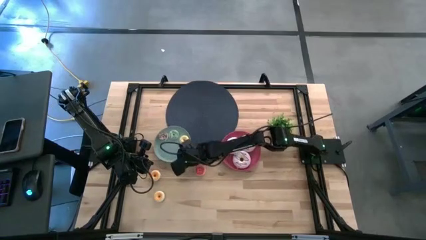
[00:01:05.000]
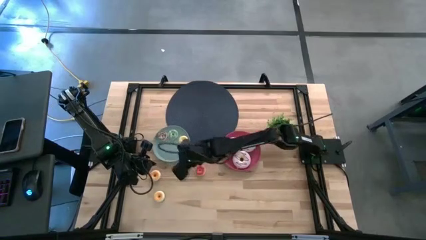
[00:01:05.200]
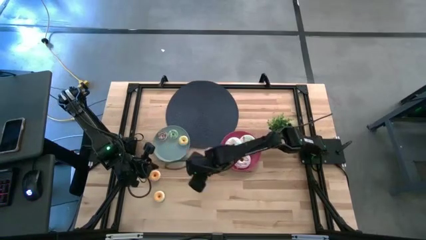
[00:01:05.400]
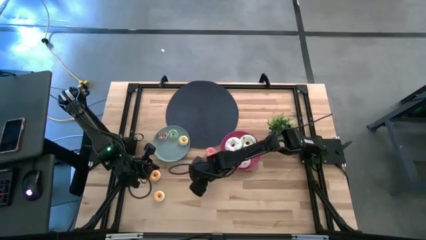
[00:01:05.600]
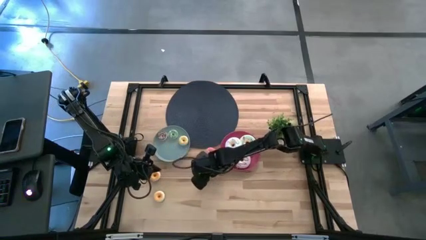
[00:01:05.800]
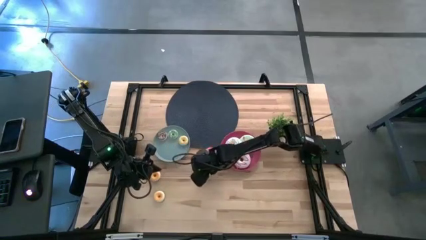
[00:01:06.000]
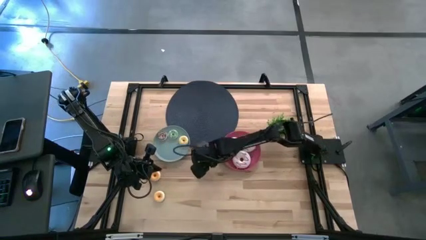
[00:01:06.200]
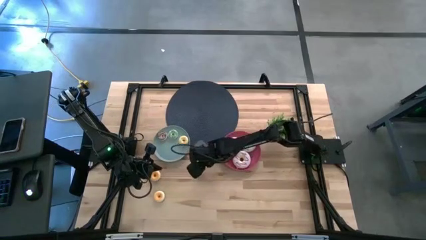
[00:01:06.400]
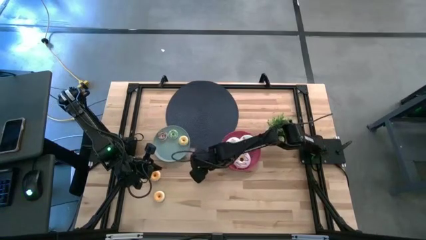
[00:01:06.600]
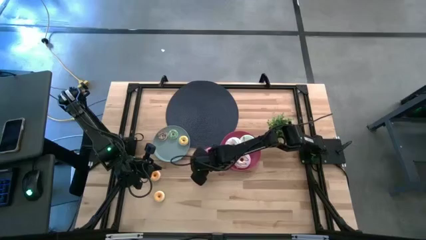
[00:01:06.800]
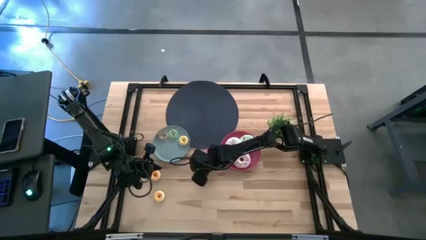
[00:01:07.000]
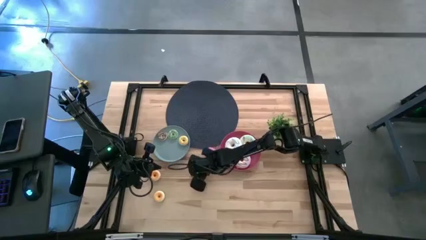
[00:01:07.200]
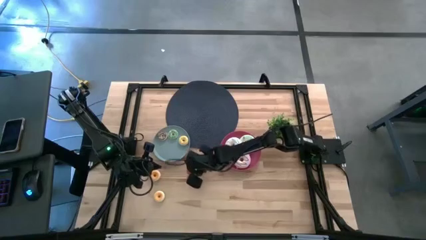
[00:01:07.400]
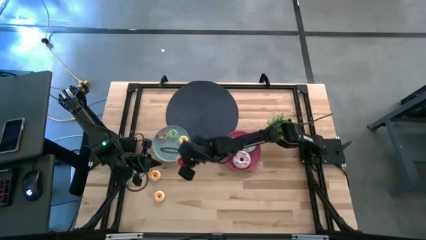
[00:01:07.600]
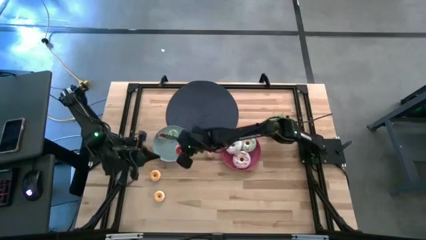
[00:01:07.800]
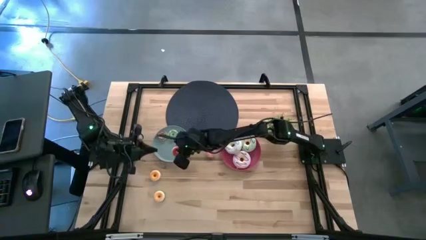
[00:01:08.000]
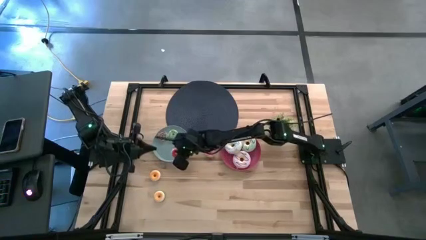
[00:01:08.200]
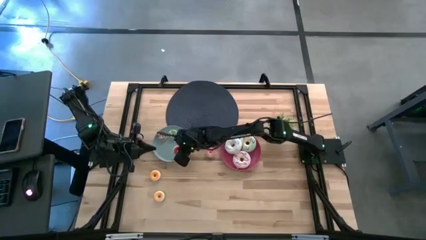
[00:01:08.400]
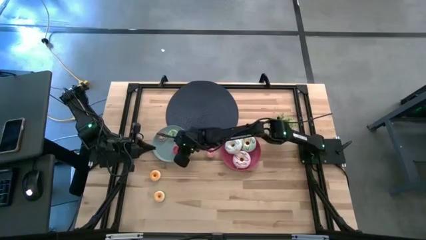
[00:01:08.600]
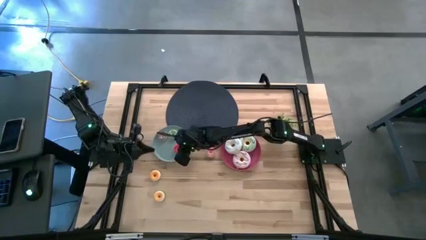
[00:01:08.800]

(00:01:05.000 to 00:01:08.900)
Task: Pick & Place donuts
Put the small red doughnut on the blue plate

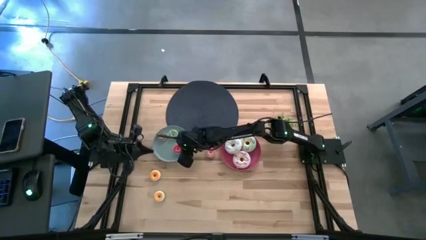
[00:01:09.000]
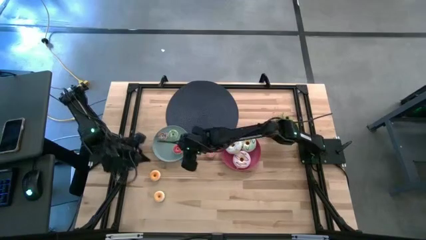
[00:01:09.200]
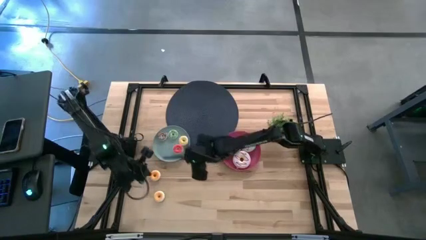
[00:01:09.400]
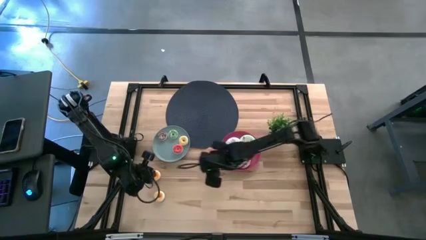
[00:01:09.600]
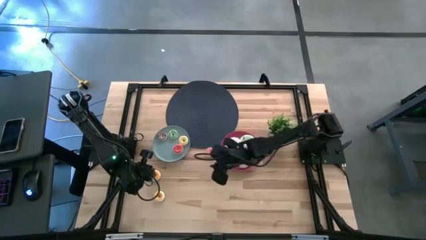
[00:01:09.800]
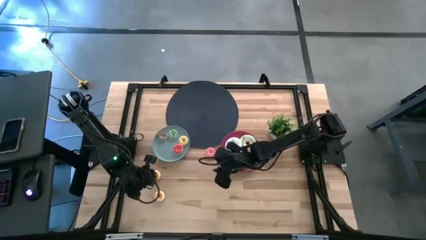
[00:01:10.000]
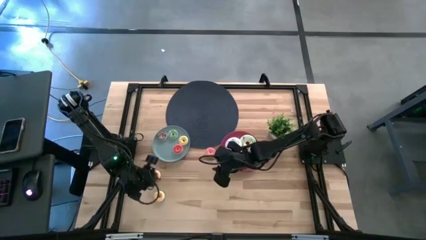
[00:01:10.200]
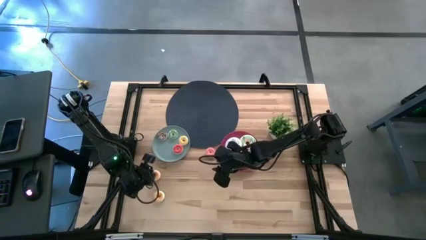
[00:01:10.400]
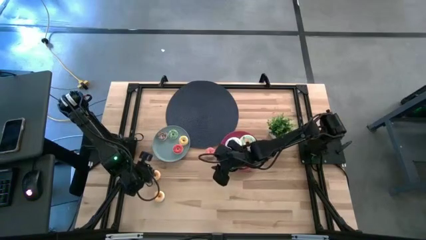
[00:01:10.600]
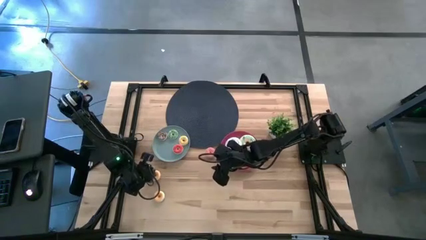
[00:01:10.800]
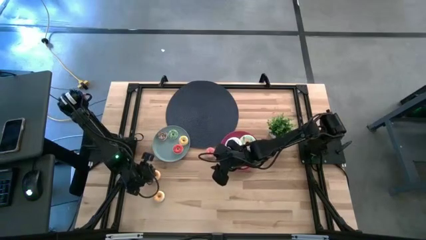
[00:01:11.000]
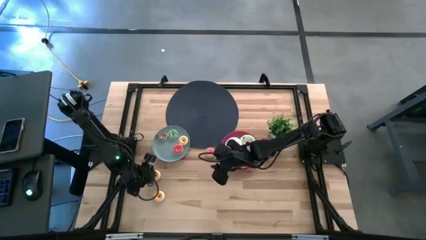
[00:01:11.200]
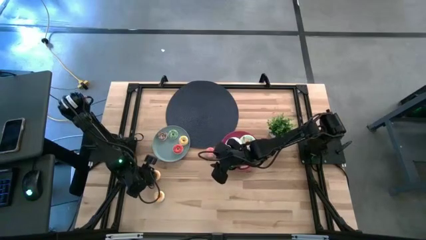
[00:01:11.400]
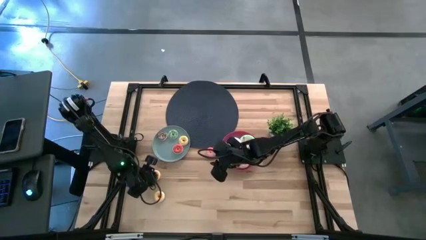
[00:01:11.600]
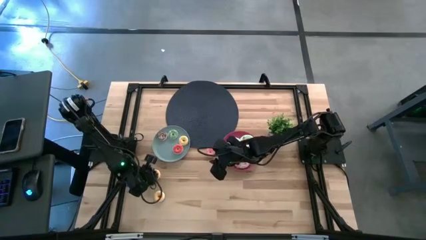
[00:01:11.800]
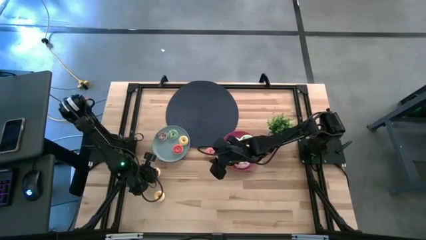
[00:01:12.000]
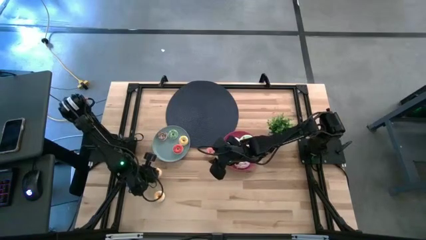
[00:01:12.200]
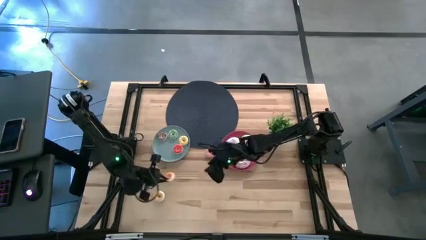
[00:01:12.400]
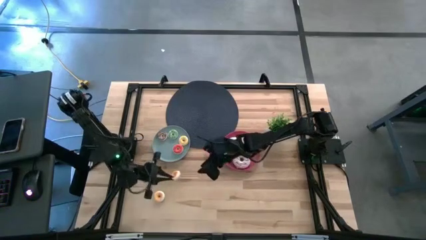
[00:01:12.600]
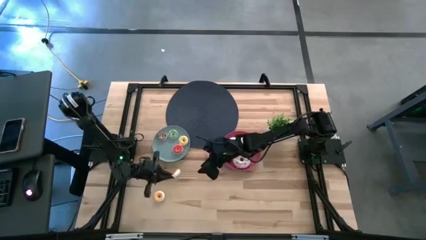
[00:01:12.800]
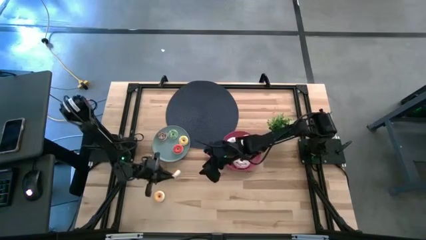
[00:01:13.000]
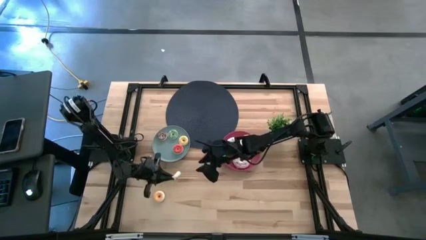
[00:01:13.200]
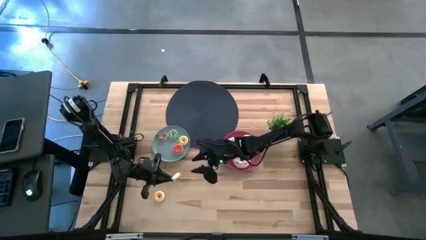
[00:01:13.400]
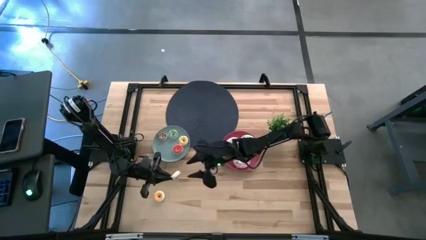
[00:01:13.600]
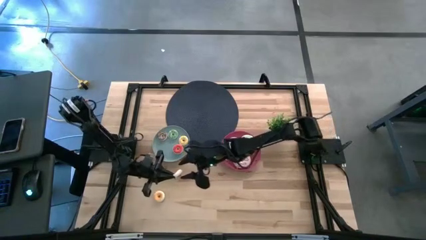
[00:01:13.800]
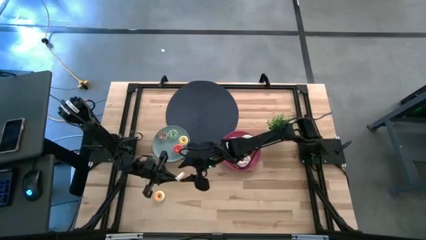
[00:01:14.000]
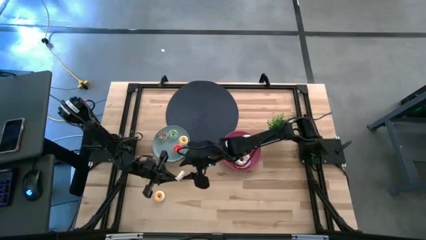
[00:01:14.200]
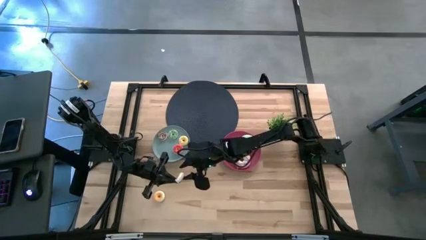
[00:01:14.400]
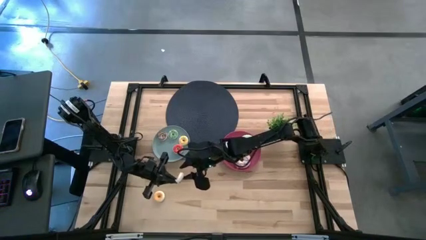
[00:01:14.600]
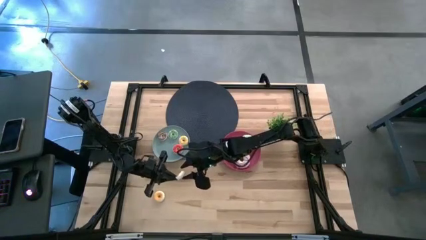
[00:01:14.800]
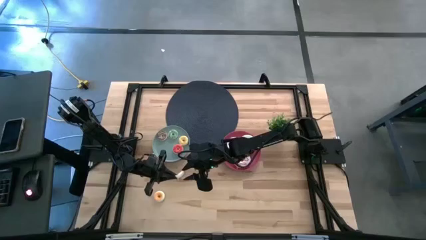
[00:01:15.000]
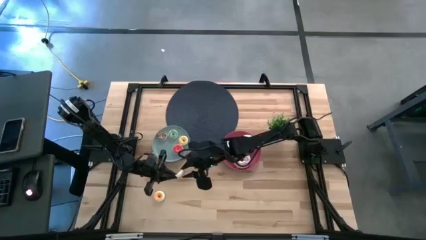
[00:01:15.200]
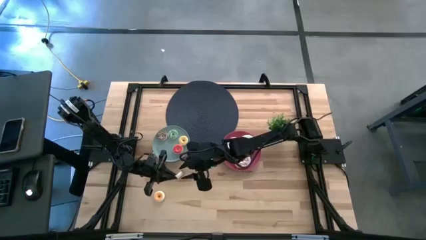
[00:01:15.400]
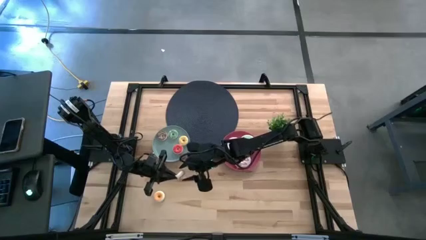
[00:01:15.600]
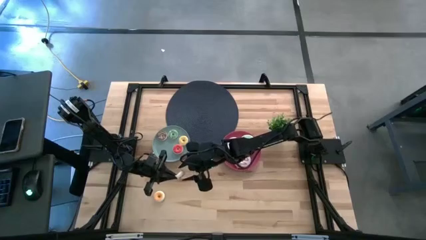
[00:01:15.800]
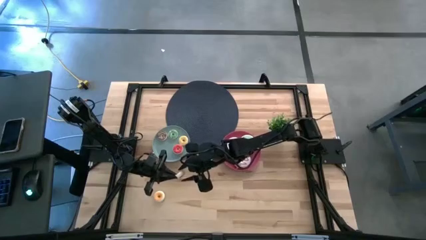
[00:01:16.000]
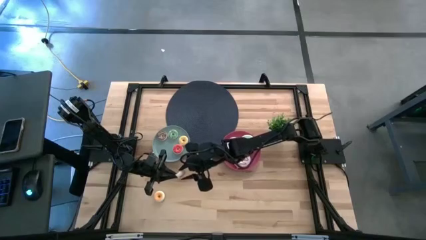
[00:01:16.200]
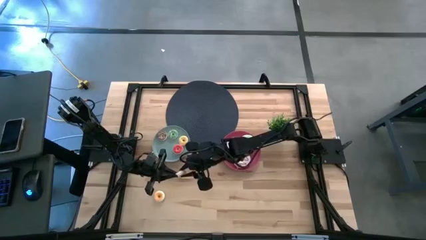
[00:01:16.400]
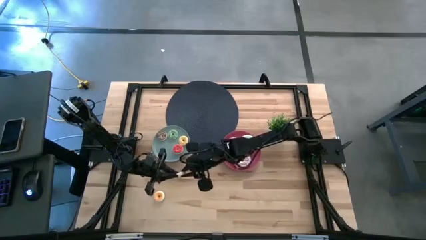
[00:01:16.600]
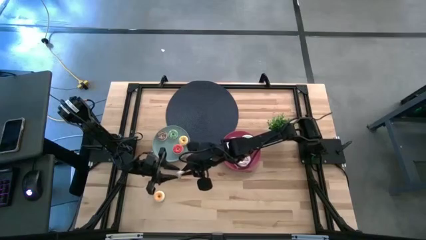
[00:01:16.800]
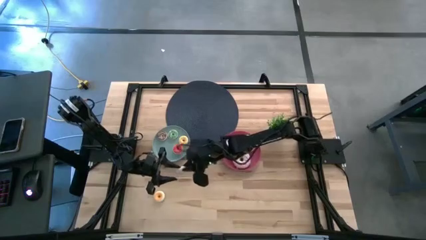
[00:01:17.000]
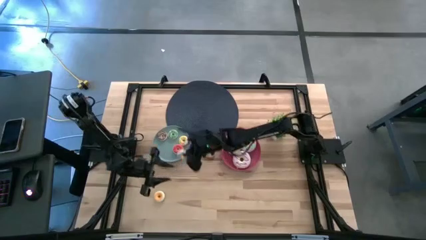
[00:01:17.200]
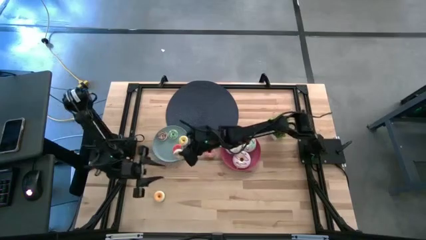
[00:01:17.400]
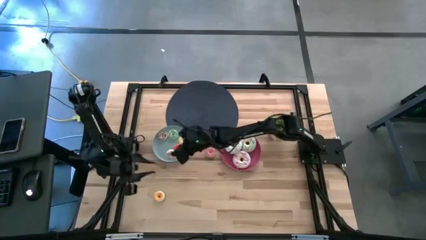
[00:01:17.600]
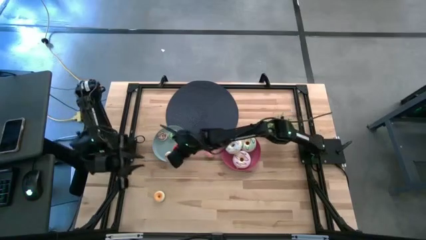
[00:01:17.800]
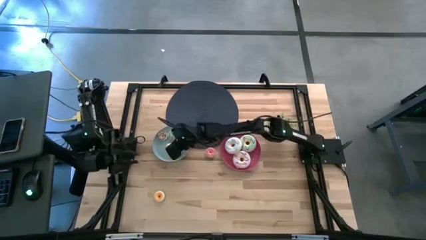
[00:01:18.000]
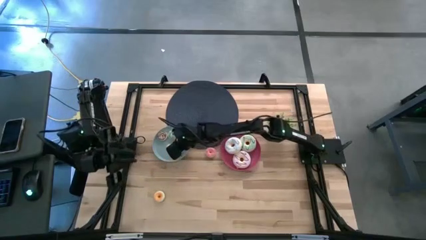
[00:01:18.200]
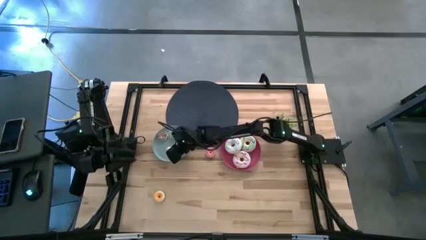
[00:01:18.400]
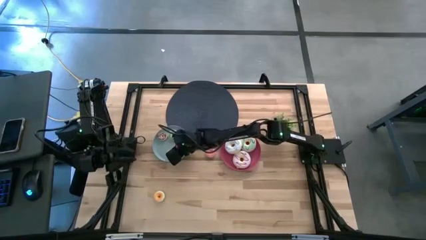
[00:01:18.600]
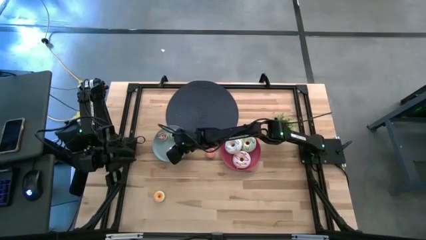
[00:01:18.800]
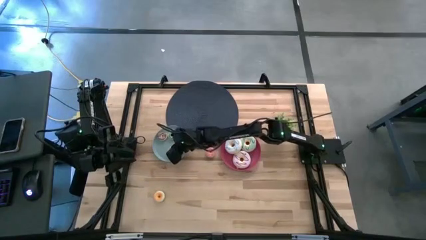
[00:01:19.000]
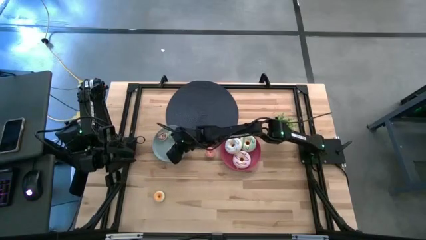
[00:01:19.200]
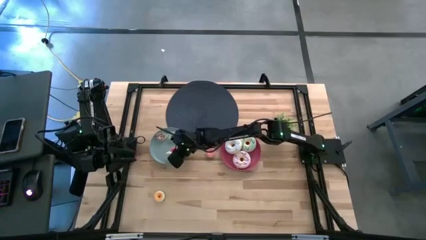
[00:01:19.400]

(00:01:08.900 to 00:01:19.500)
Put the small white doughnut on the blue plate

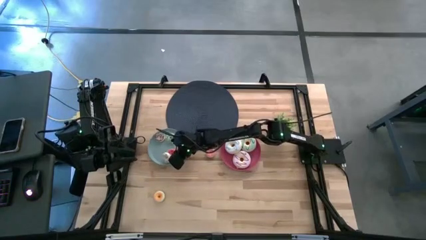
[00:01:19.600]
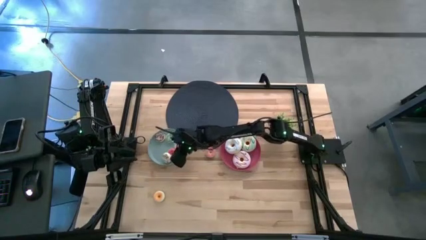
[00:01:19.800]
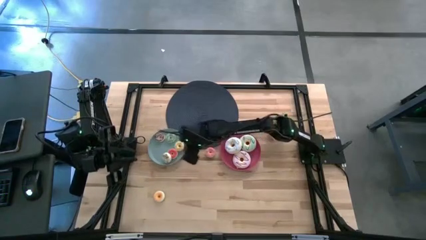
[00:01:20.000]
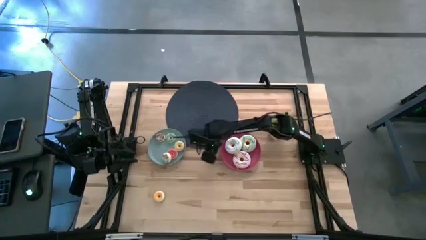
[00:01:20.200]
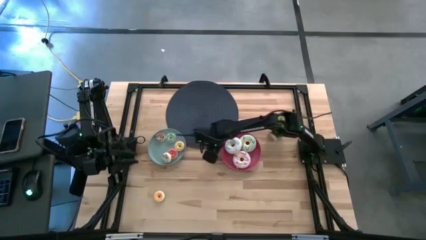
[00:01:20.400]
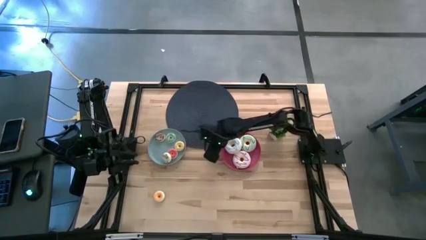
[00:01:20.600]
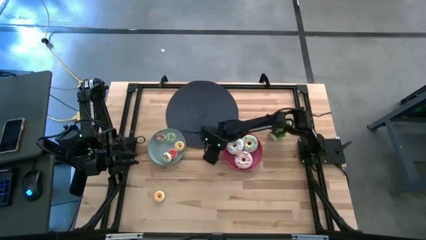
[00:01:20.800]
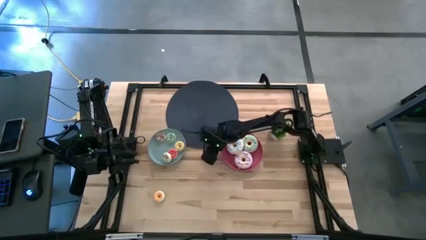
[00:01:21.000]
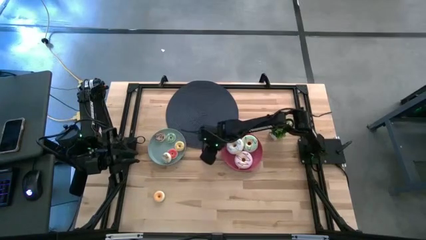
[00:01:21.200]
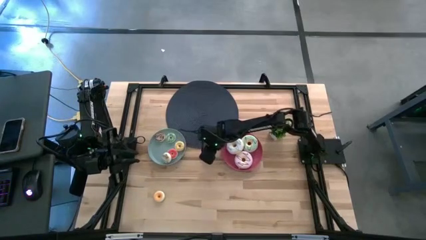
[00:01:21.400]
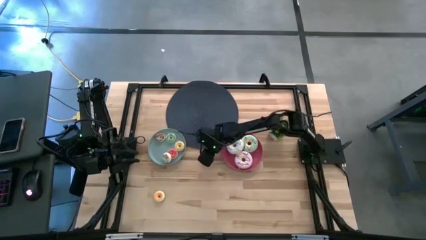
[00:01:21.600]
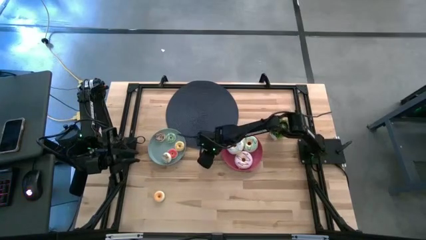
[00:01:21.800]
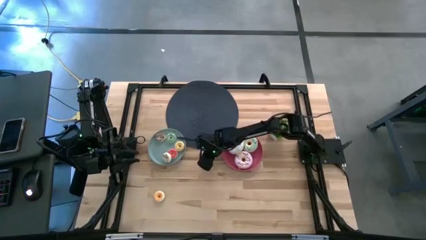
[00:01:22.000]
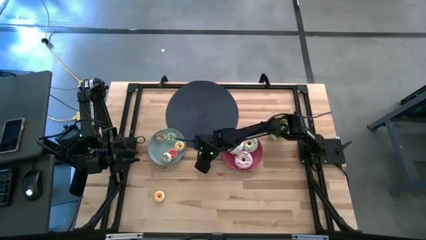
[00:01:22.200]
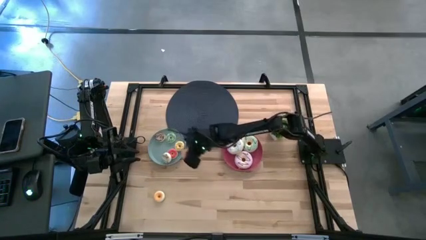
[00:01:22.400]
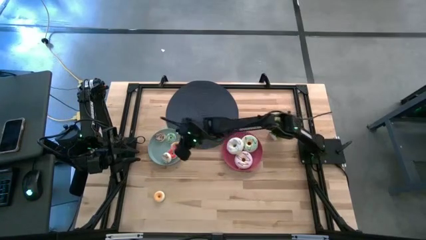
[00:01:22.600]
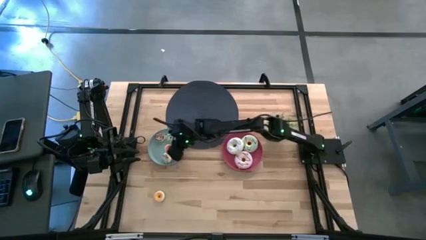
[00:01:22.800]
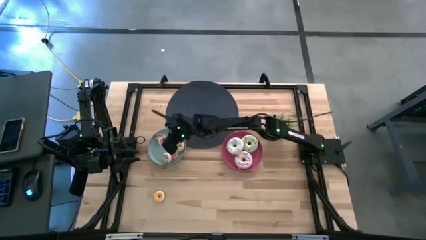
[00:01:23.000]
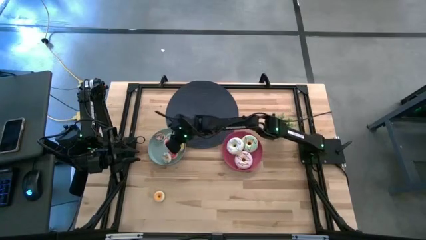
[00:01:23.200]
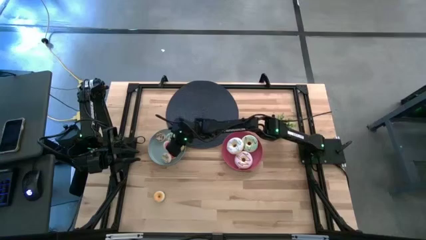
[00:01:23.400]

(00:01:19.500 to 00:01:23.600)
Put the small pink doughnut on the blue plate
